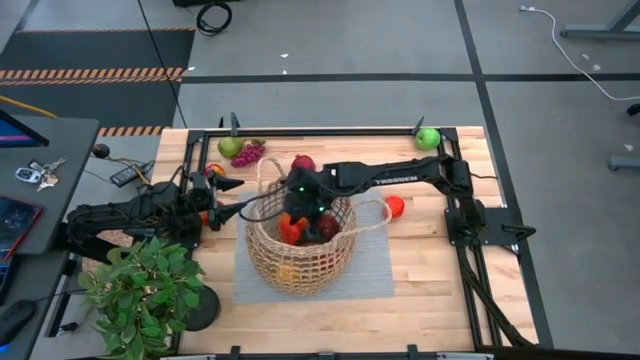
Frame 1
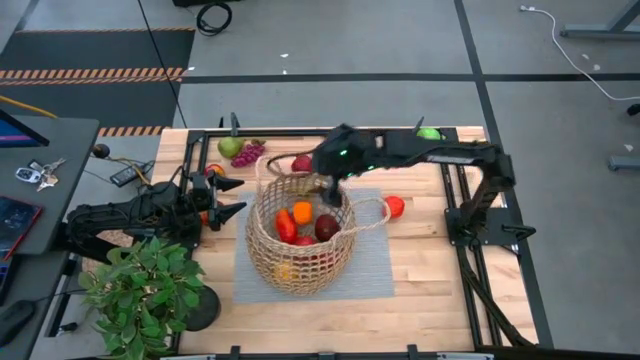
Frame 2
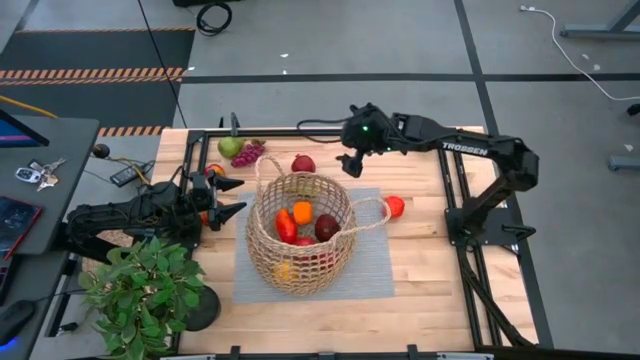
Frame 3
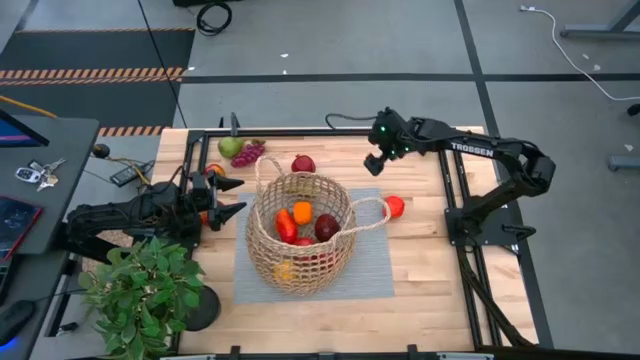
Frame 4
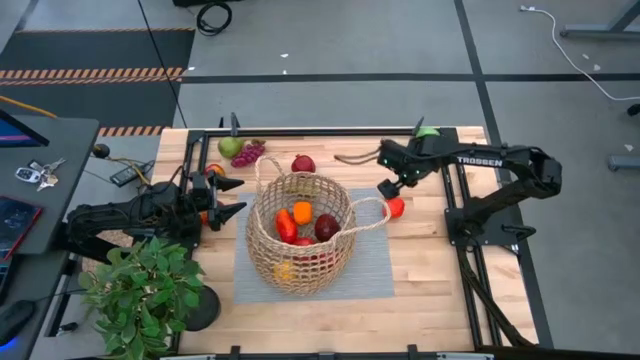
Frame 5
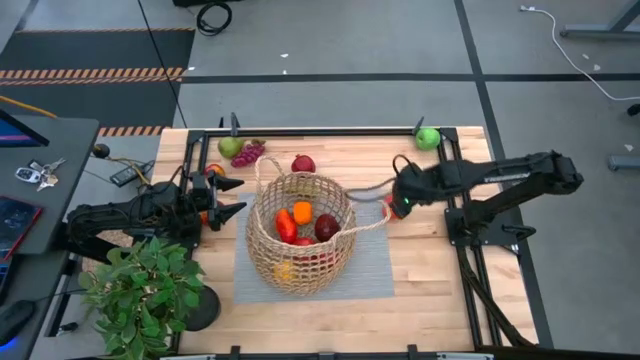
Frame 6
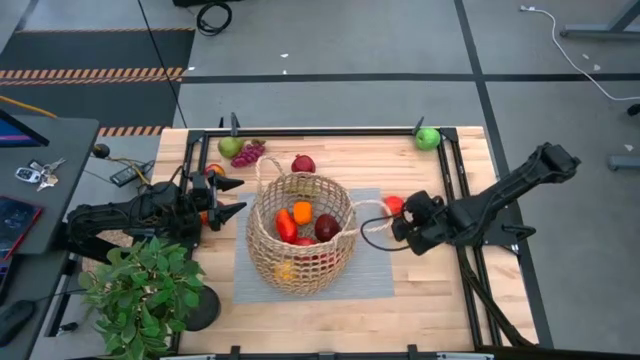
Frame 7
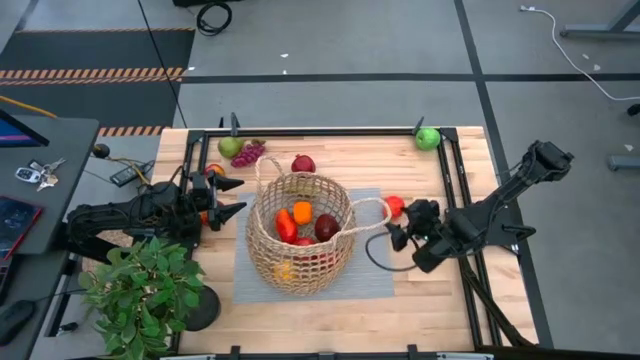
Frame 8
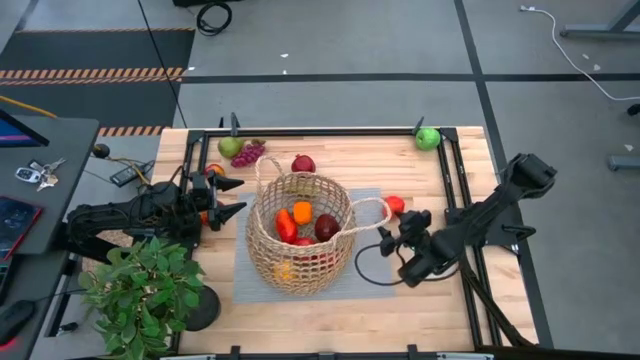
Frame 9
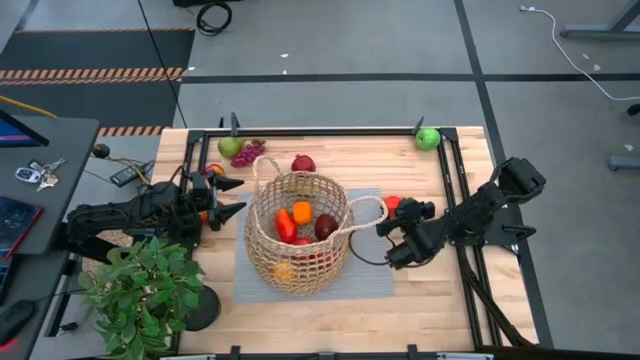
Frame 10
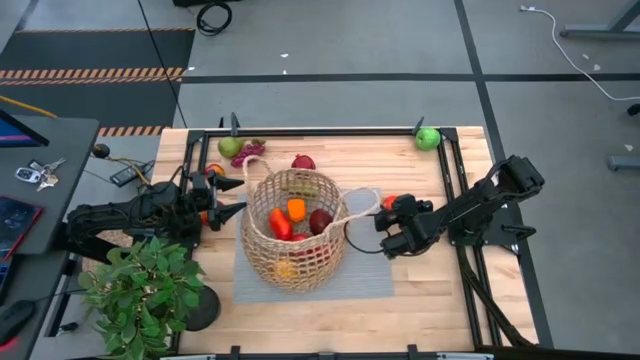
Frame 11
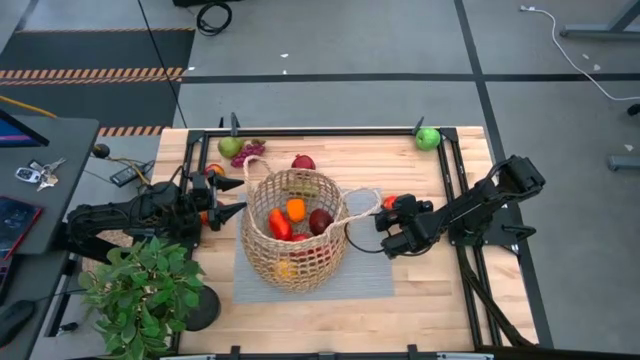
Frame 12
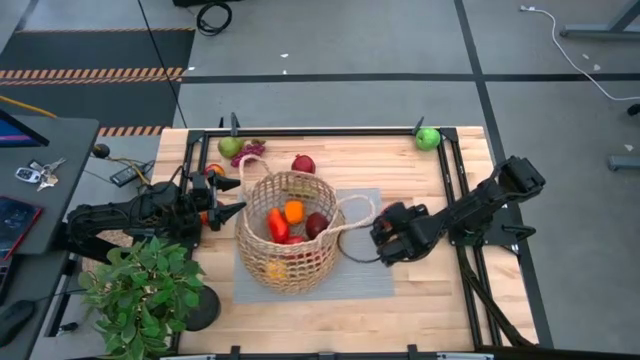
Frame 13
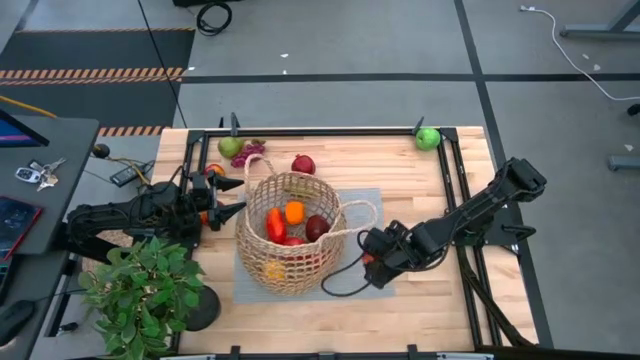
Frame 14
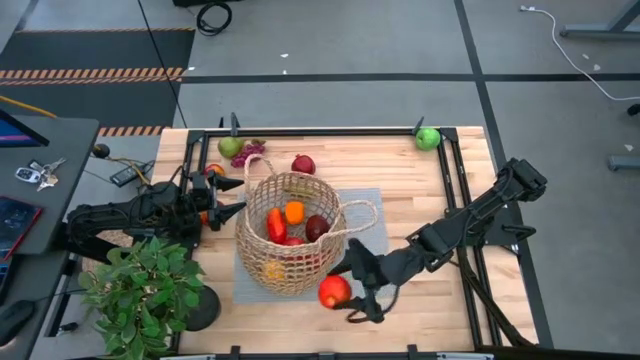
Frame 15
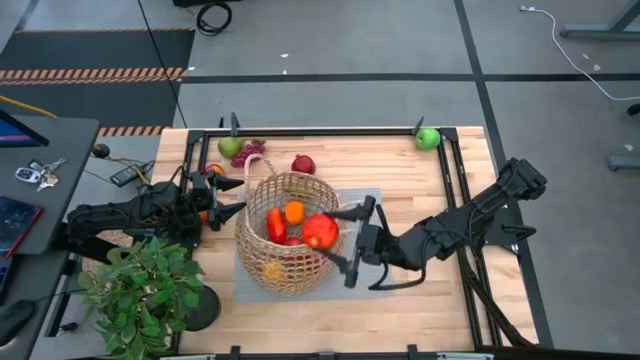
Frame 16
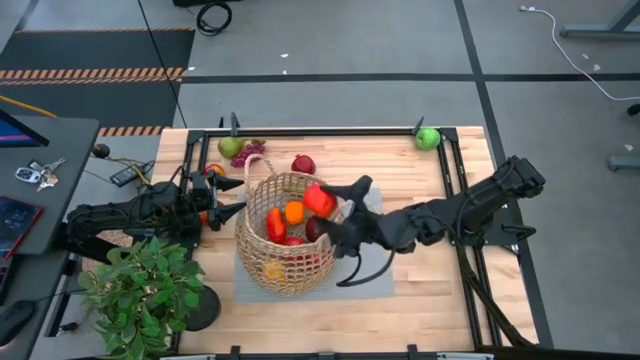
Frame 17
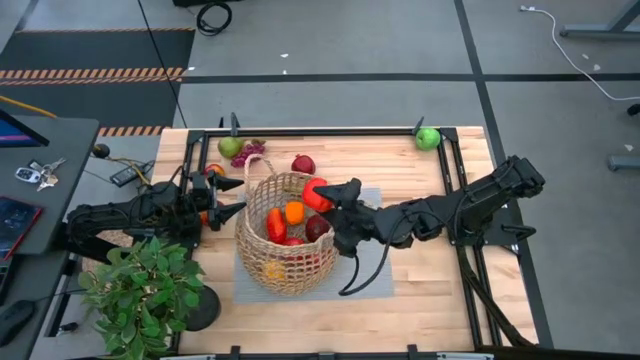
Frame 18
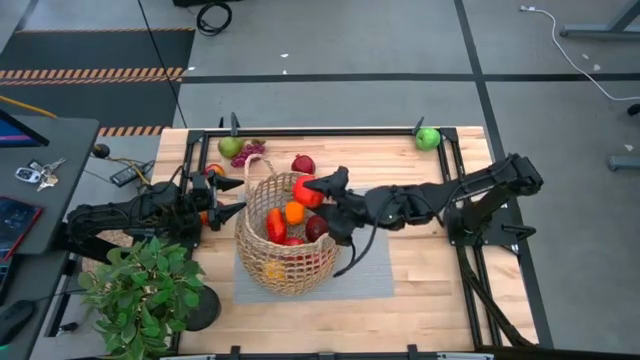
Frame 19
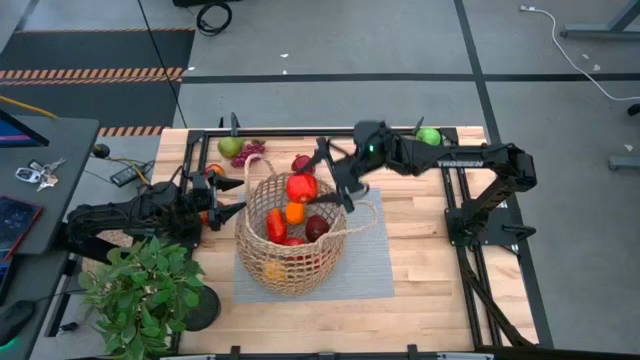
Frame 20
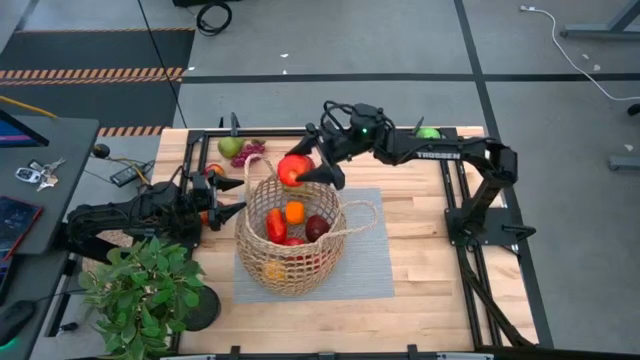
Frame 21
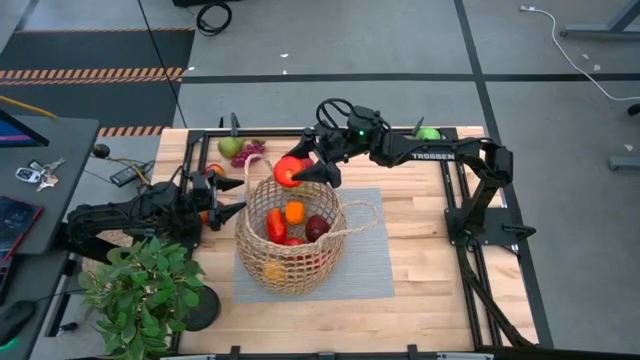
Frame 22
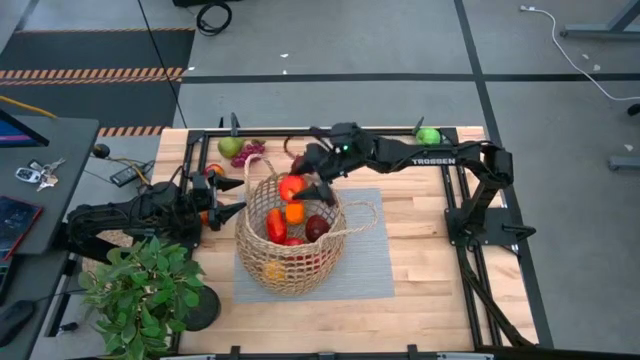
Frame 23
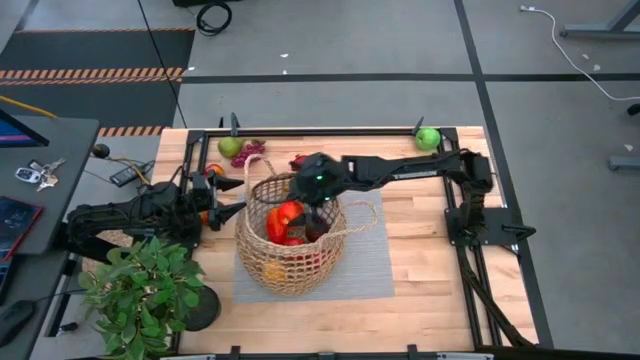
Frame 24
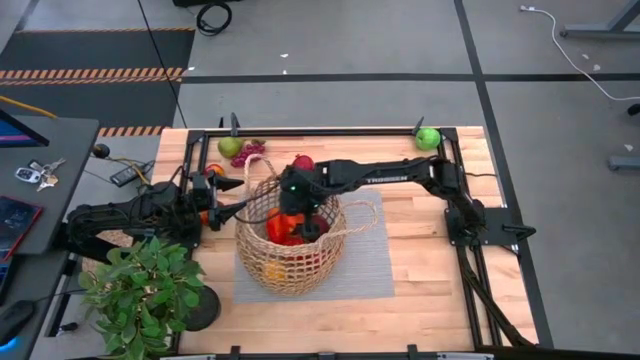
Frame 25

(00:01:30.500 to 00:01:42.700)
Task: Build produce basket
Put the red apple into the brown woven basket

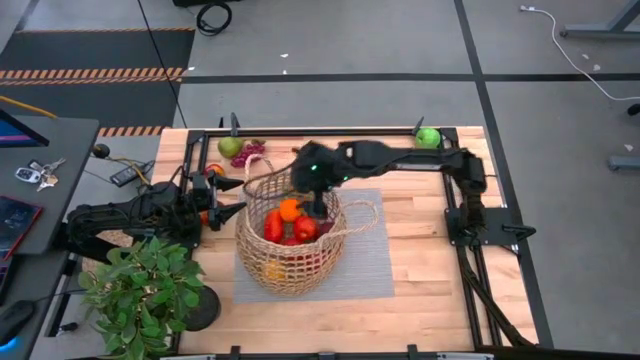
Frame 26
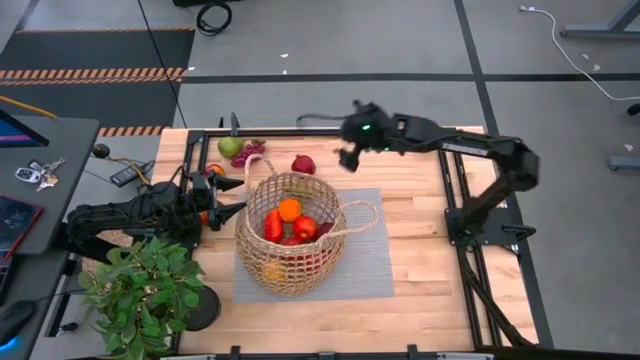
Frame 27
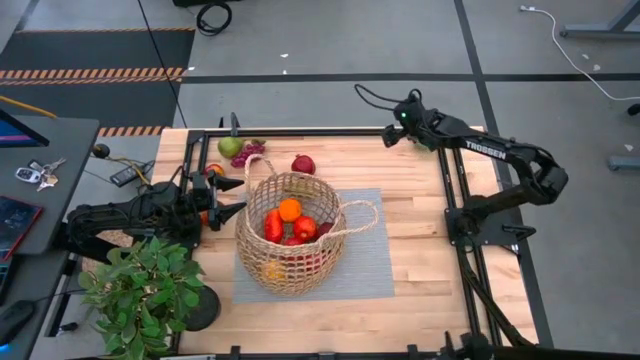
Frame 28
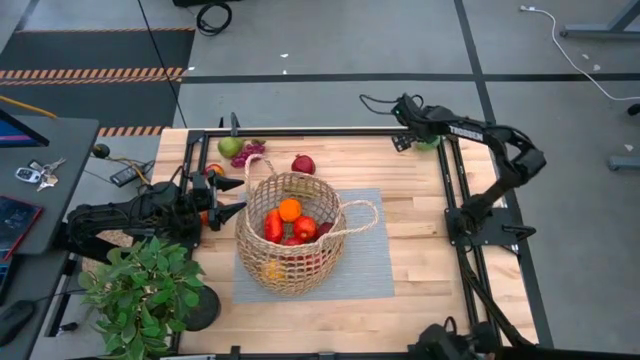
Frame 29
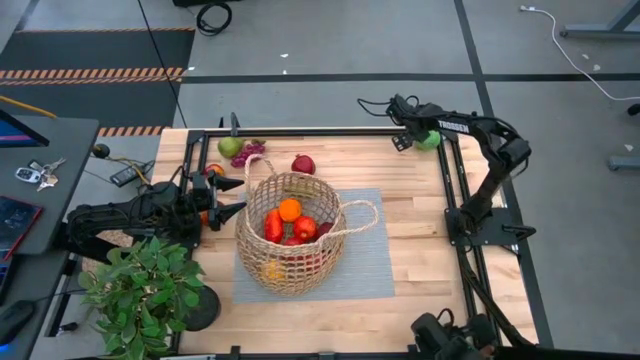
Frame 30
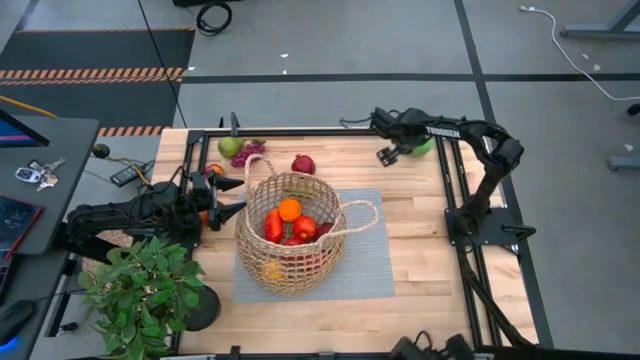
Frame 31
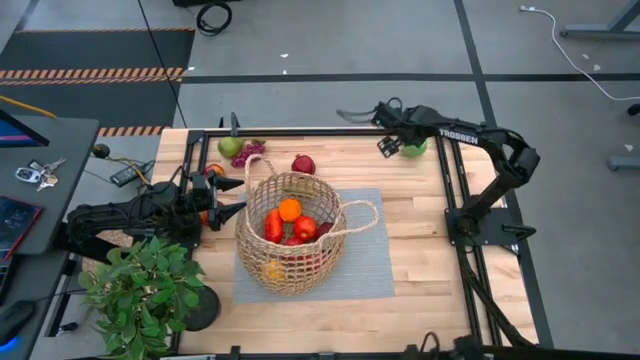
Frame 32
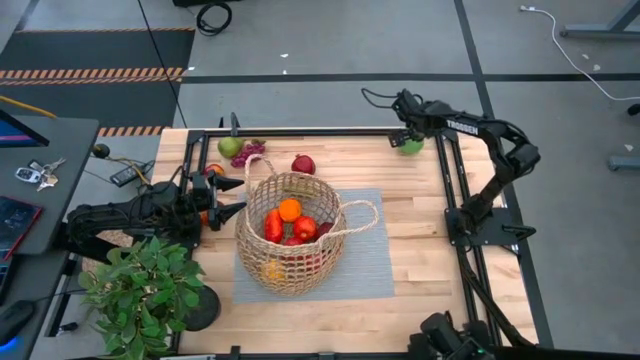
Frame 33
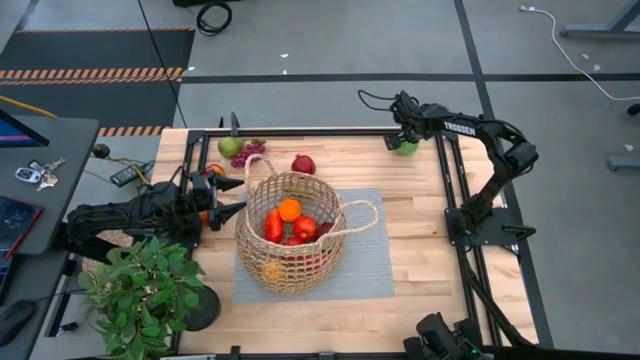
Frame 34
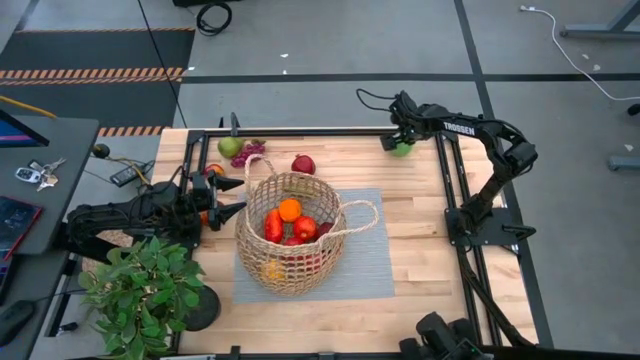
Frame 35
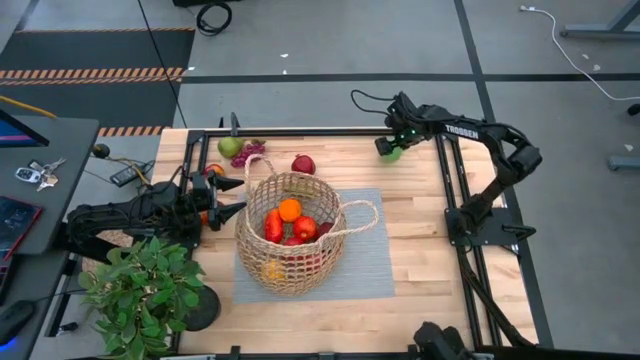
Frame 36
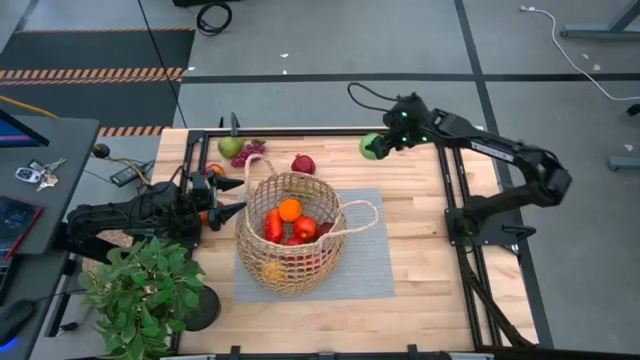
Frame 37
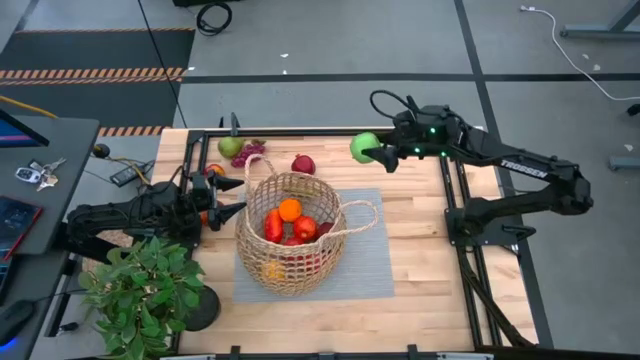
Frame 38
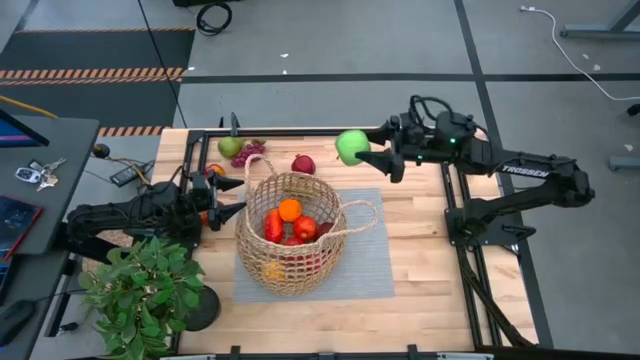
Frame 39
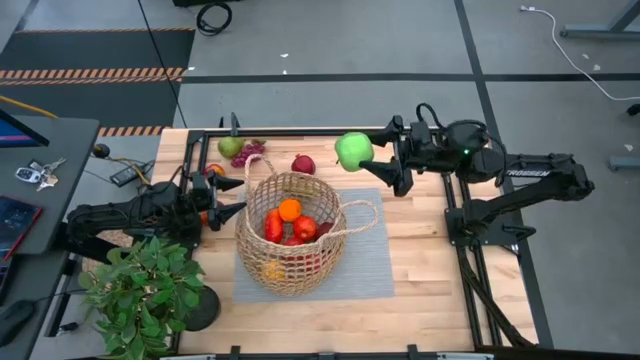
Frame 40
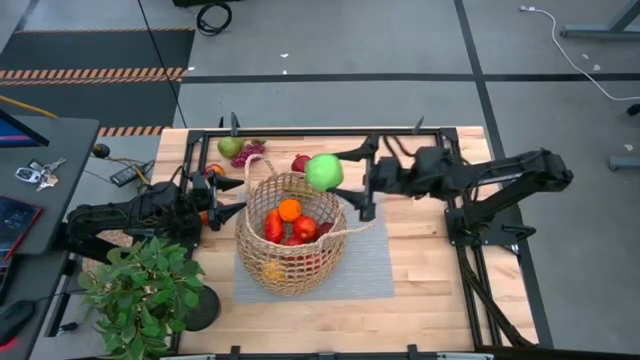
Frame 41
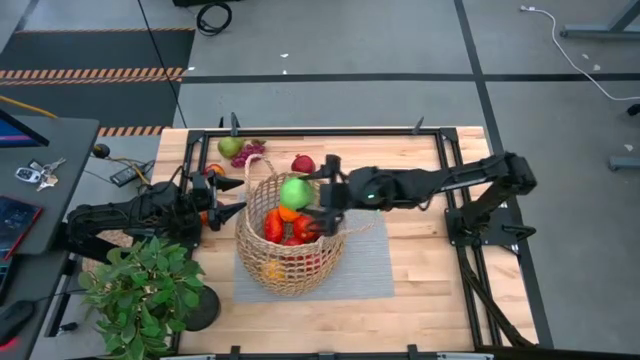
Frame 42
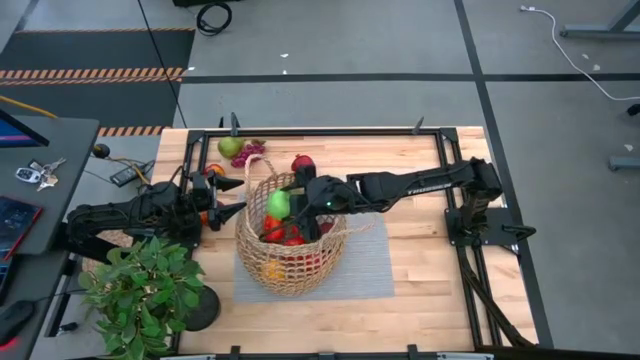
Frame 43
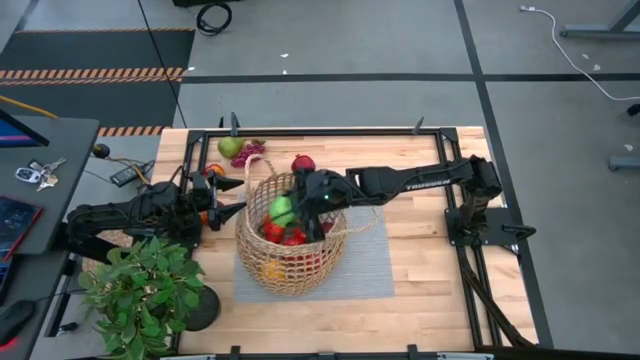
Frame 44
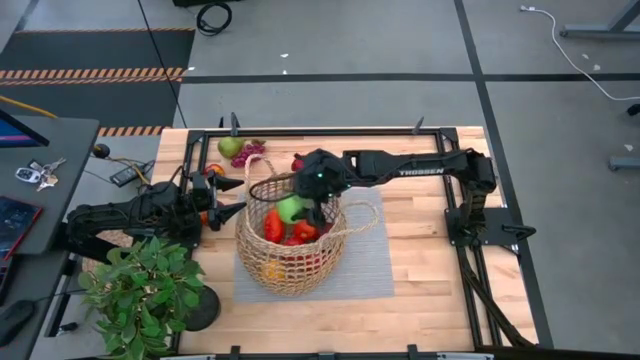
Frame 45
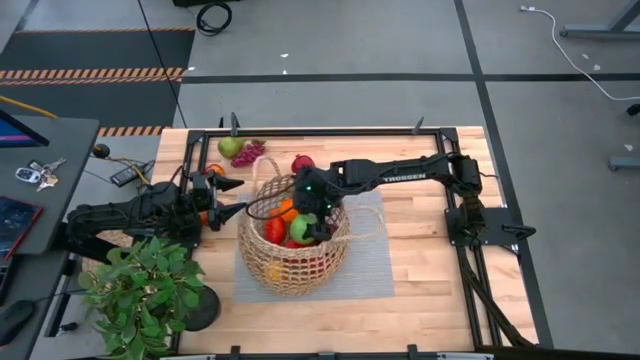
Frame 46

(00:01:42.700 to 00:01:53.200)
Put the green apple into the brown woven basket
